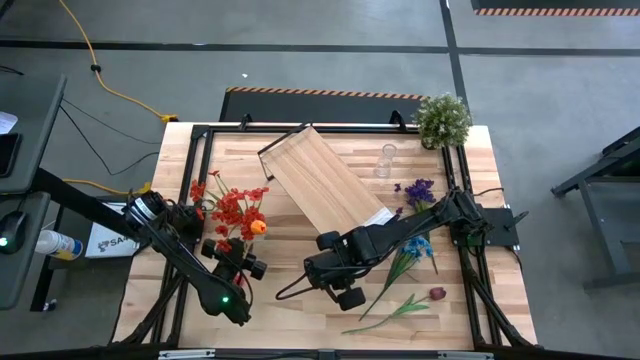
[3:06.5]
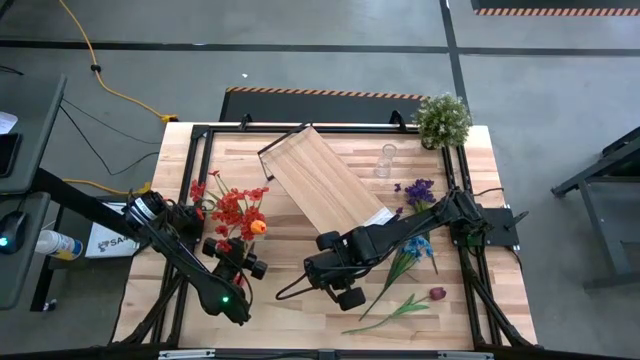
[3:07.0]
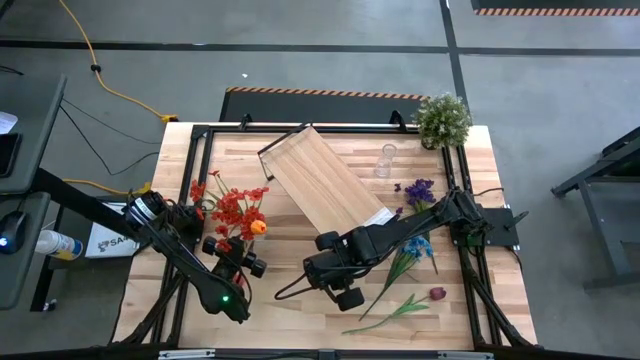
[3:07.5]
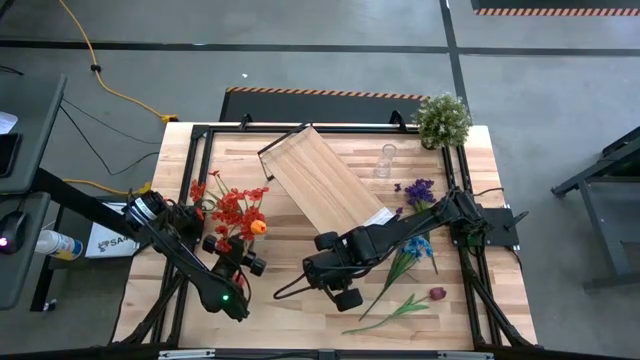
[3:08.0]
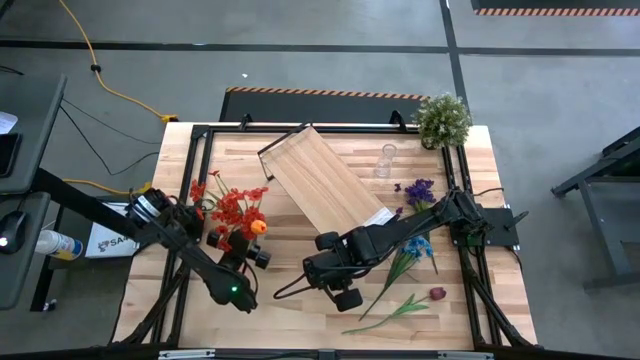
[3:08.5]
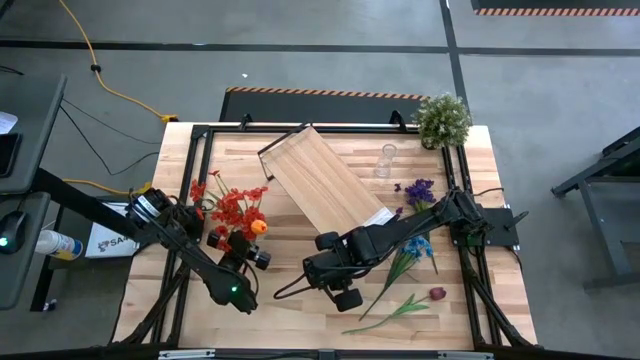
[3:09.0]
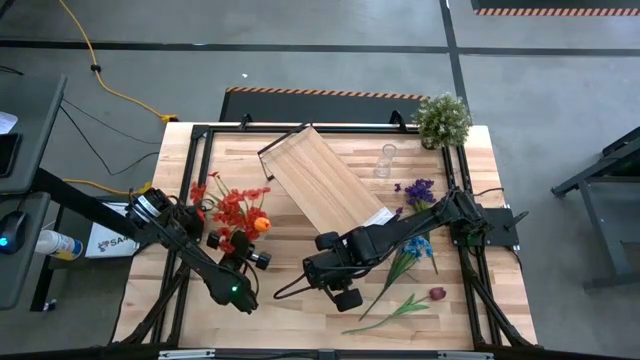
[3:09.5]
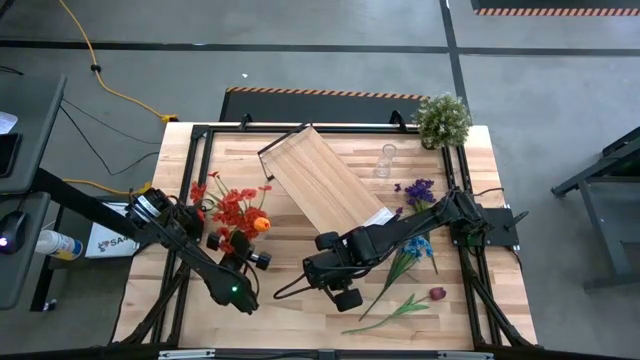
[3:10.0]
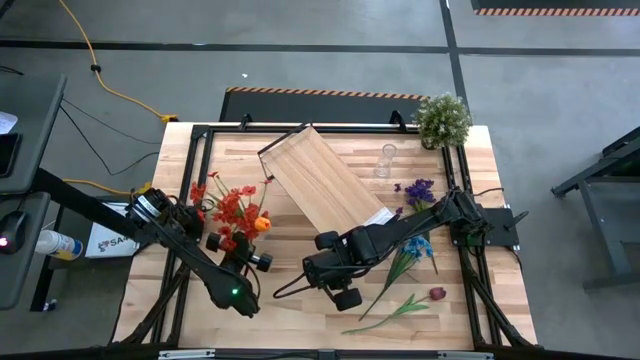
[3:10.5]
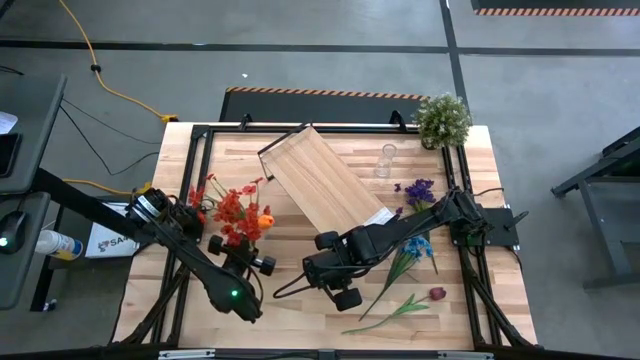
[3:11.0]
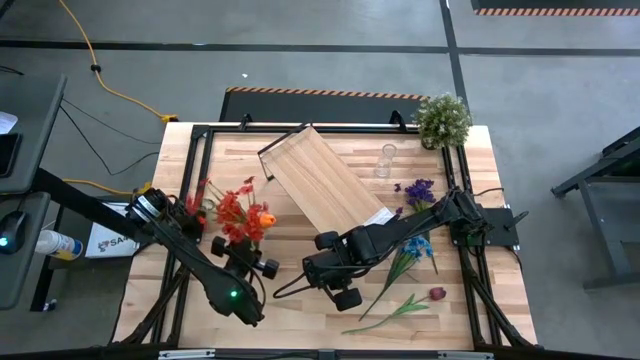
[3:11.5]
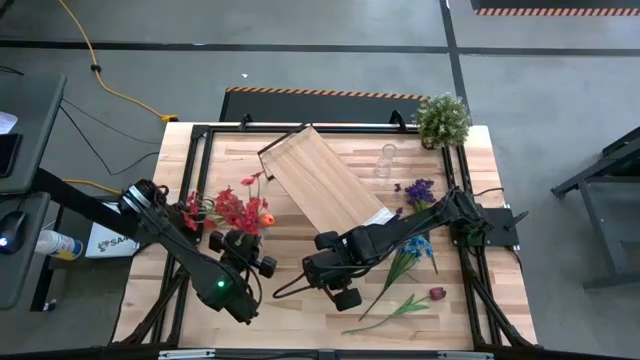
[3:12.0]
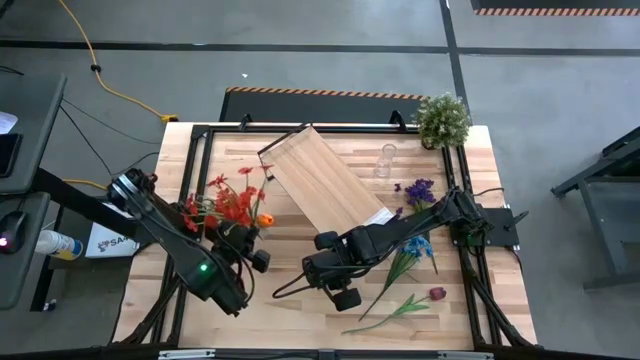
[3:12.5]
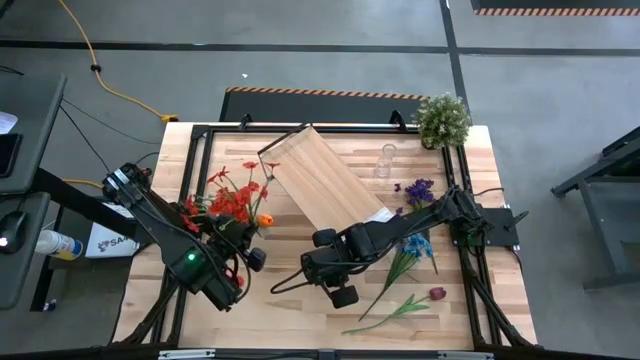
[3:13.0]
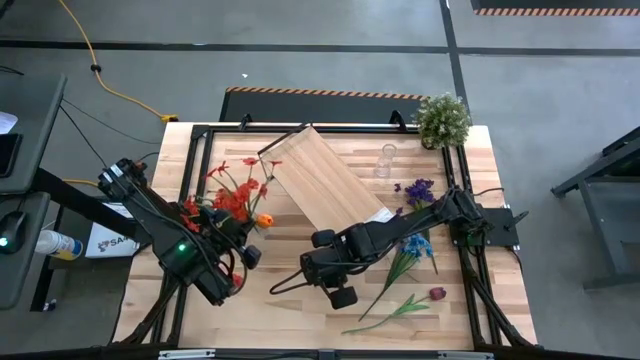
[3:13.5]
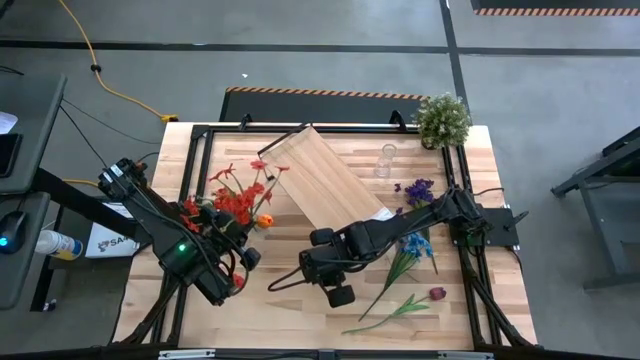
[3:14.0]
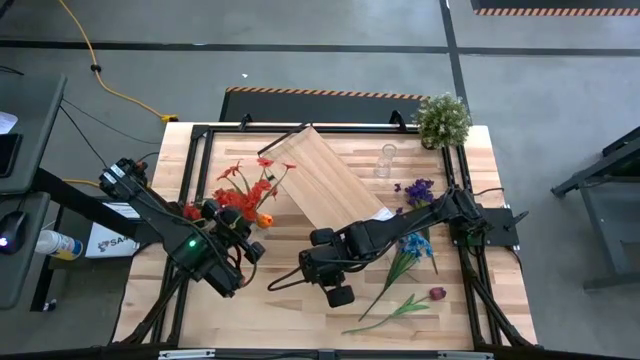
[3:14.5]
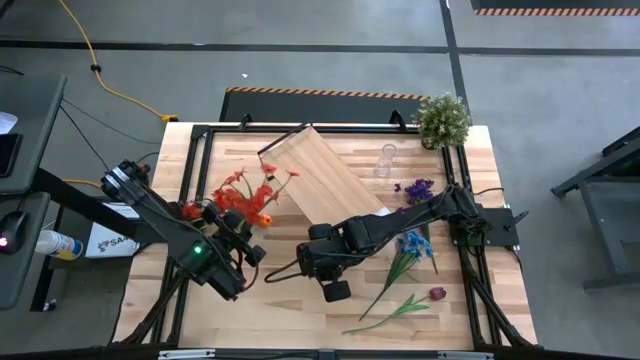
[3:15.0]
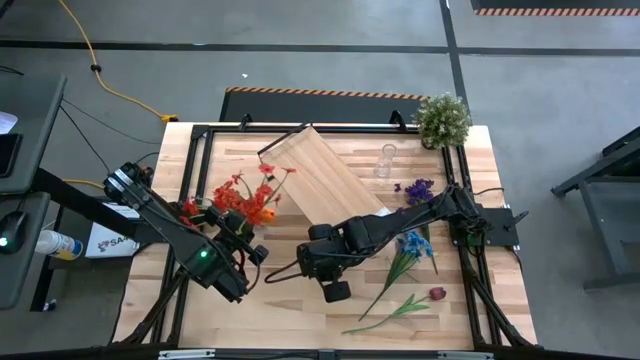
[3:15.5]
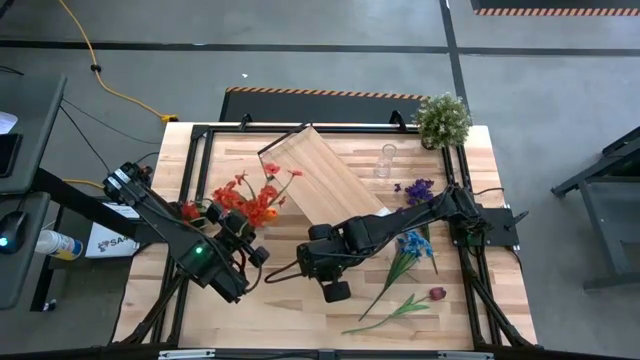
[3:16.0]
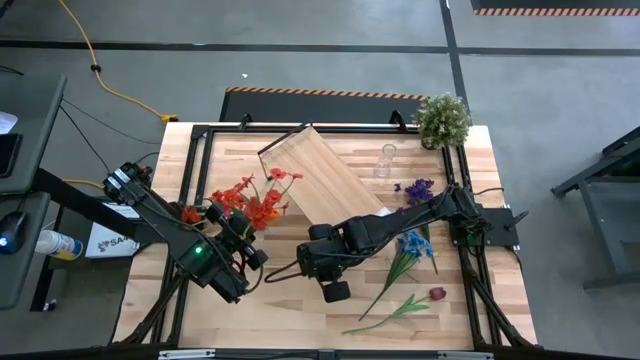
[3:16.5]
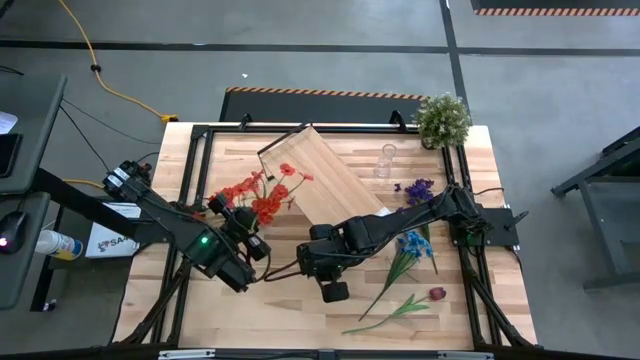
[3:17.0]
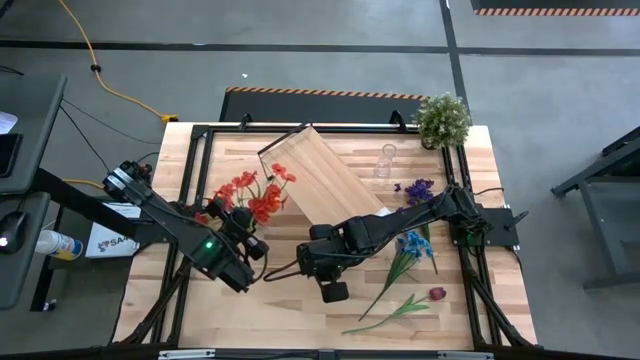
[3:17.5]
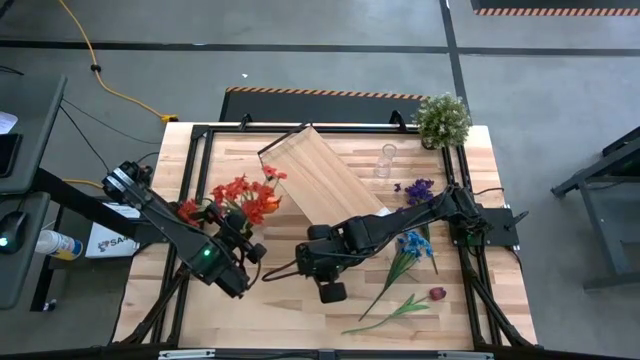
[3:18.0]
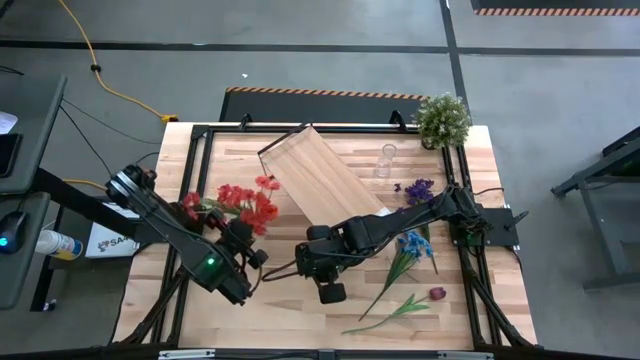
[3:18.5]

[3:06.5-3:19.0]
Task: Pick and place flowers into a vace then onto a shelf
Put the red flowers into the bottom transparent vase

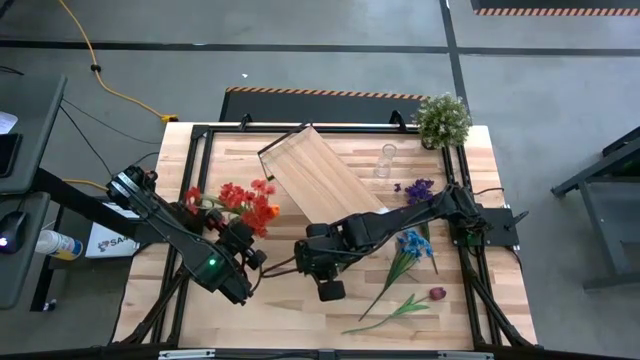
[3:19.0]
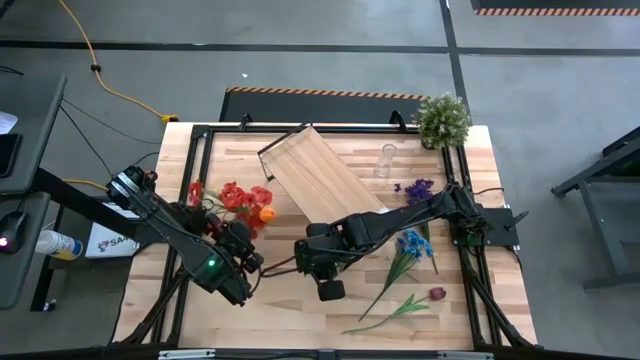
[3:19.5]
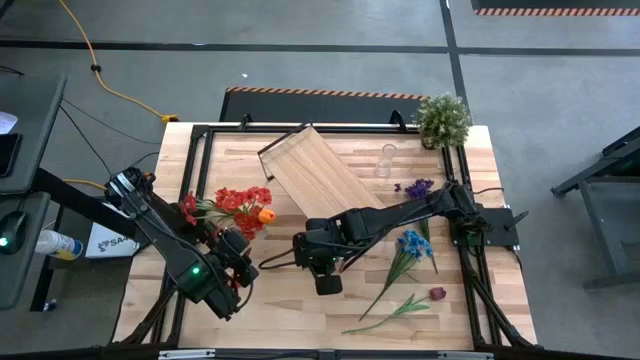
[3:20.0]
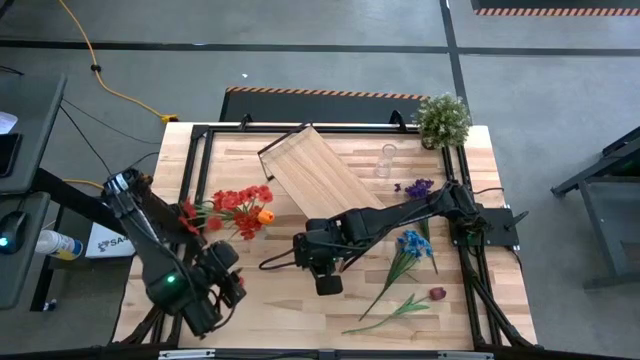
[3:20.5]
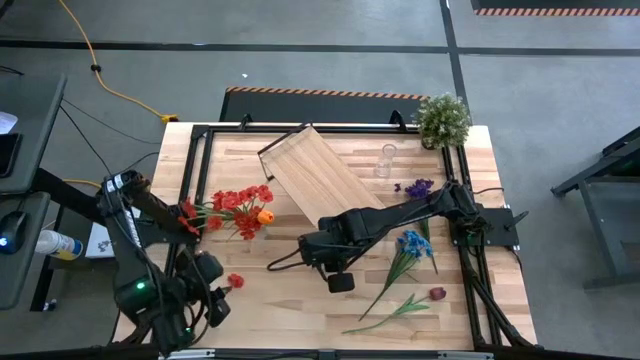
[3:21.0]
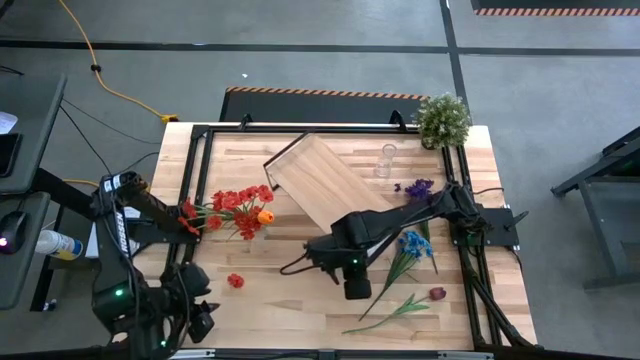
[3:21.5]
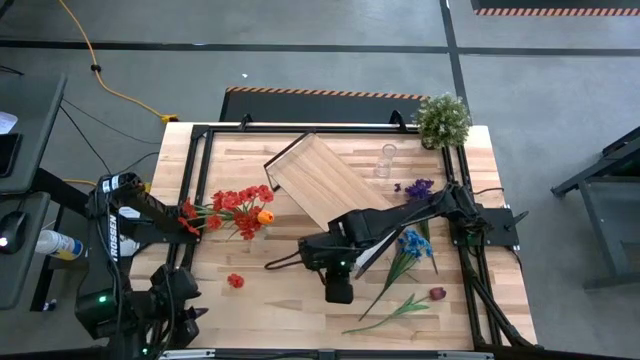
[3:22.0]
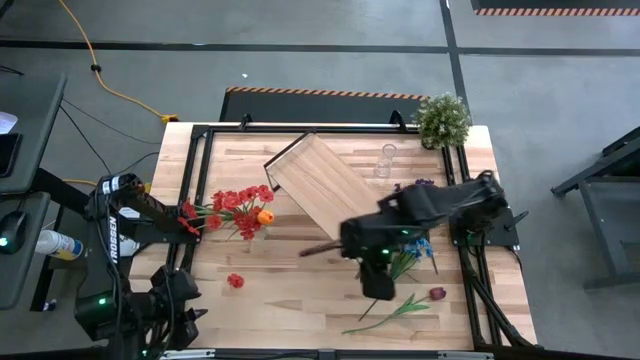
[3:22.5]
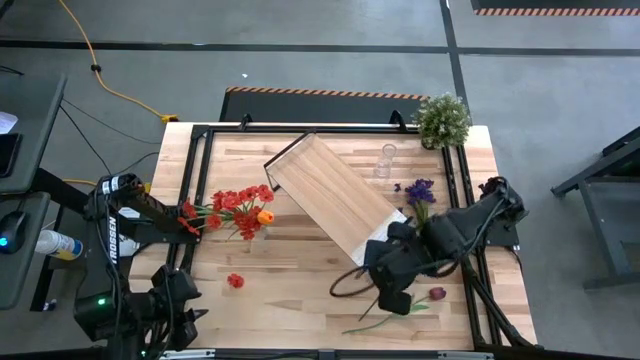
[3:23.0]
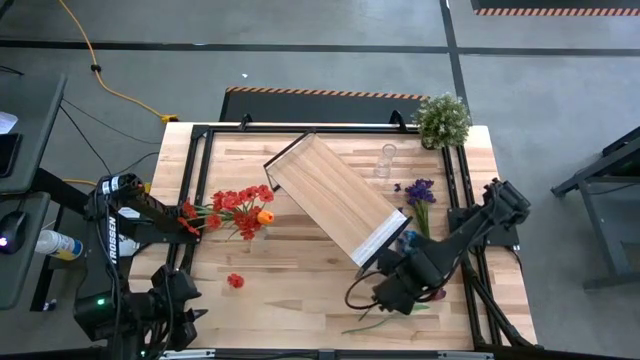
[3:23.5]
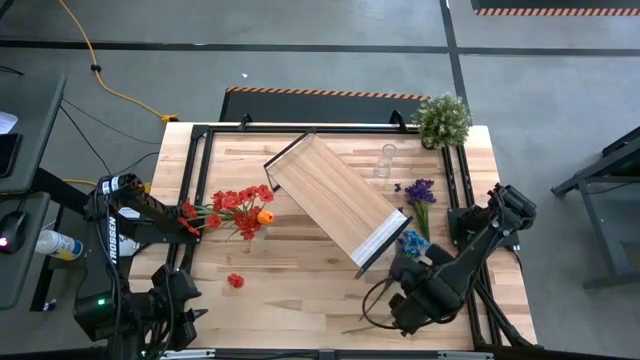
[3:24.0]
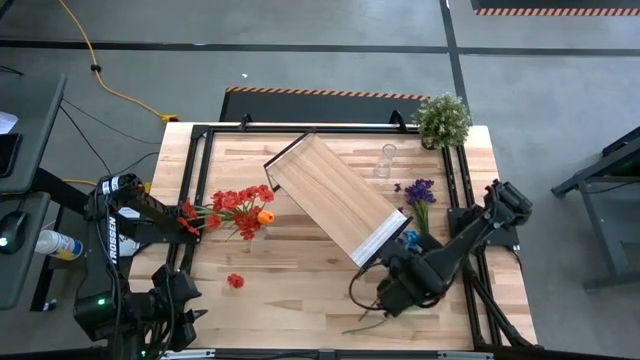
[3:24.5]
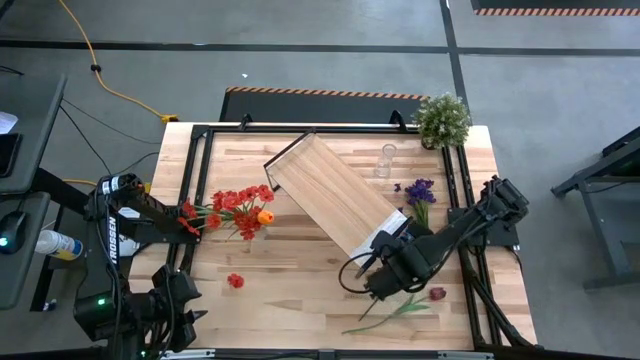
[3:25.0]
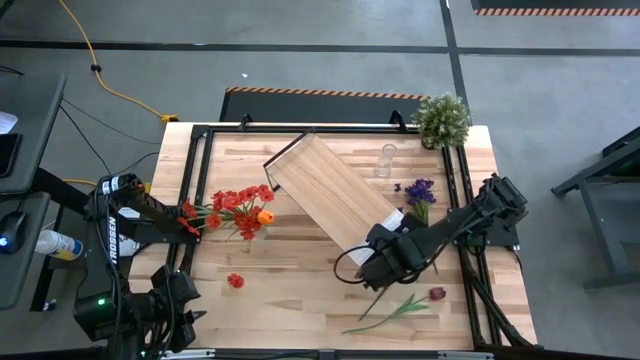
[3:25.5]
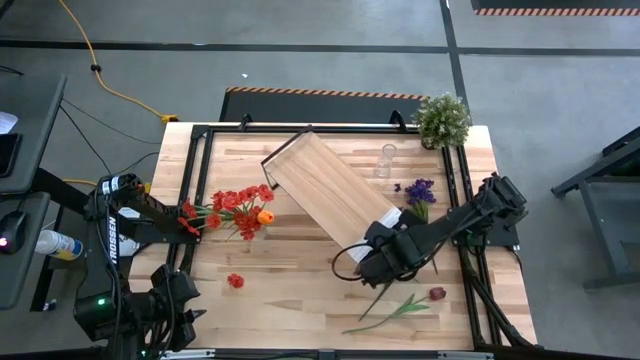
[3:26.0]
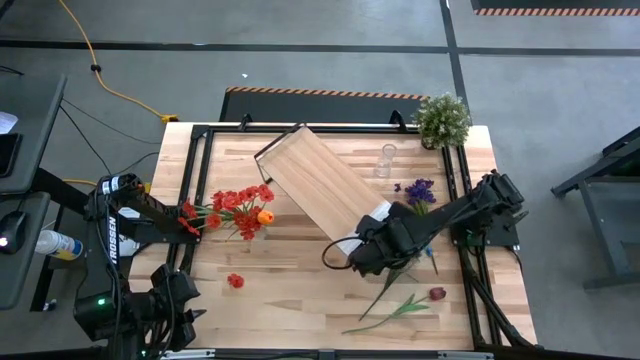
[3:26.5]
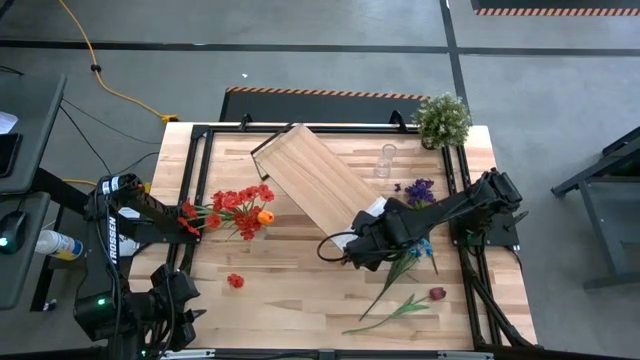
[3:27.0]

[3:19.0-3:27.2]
Adjust the shelf

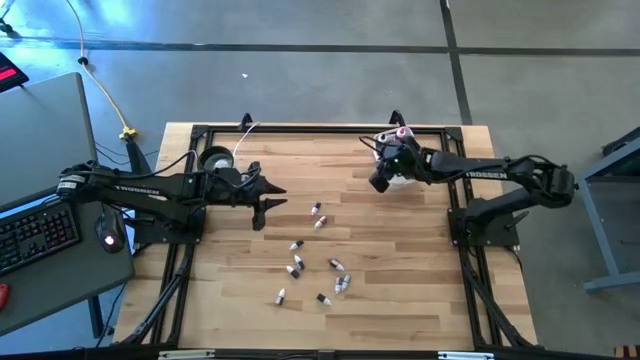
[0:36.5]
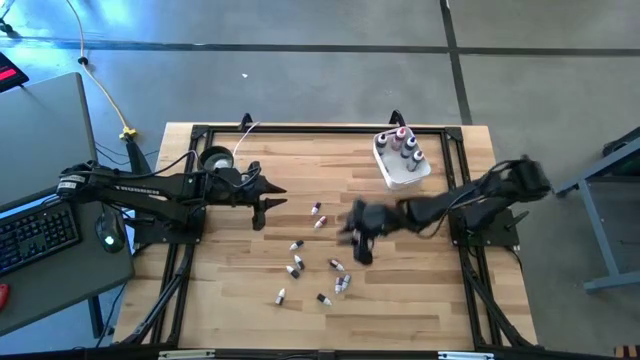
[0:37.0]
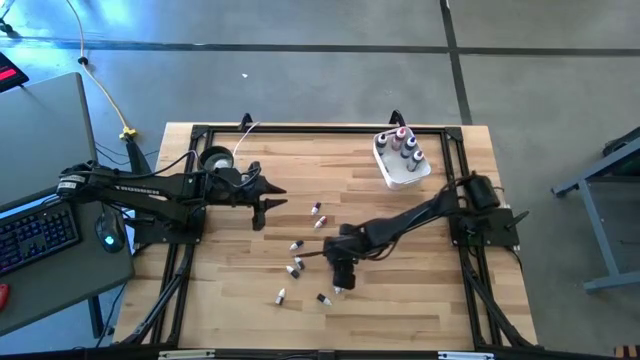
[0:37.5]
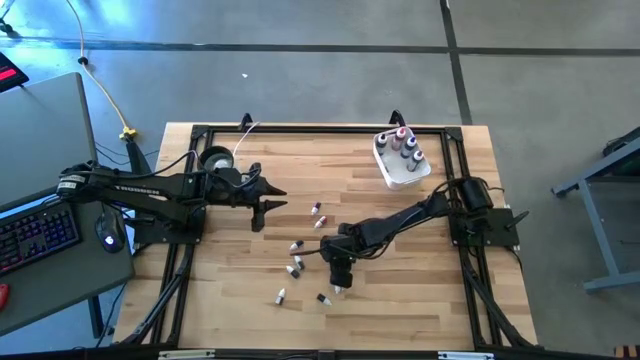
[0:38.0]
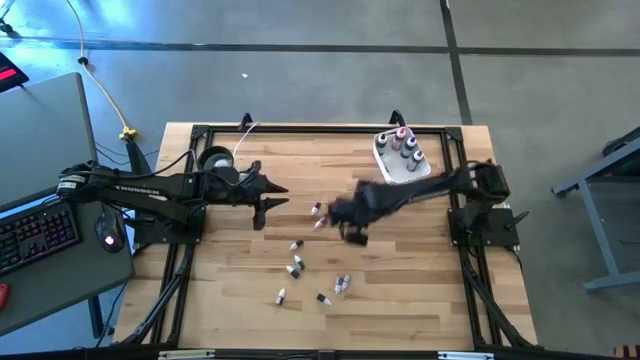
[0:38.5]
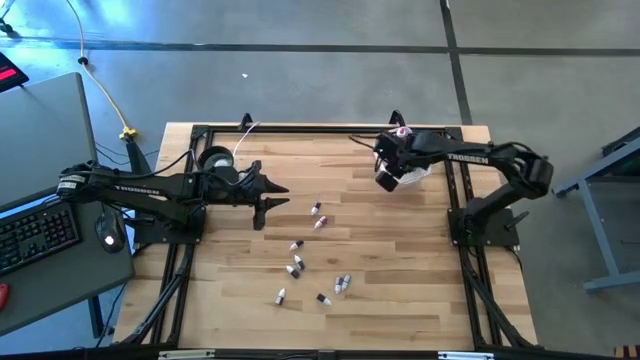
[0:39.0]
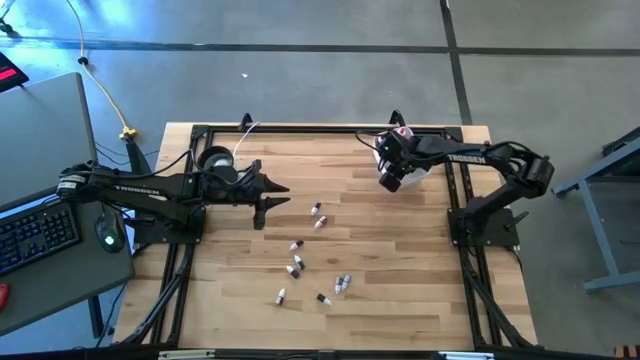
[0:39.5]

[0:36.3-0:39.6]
Task: Pick & Place food coloring
Put the bottom right small black food coloring bottle into the white bin
